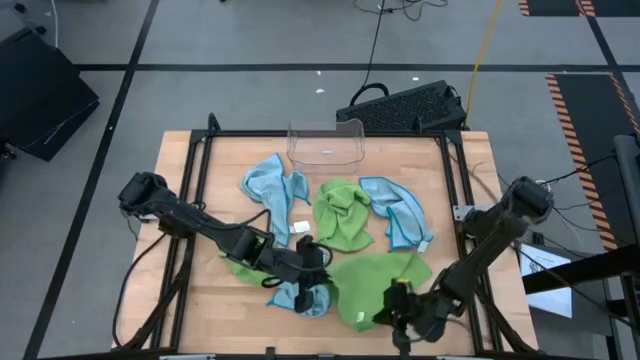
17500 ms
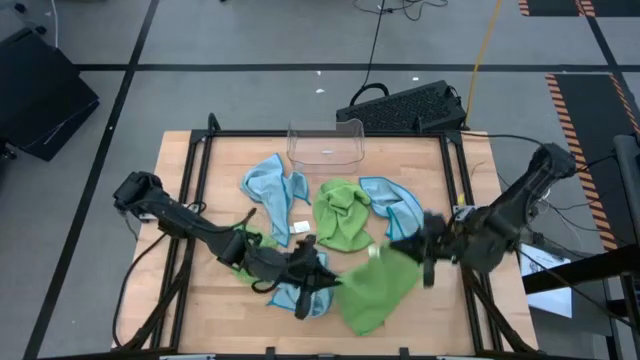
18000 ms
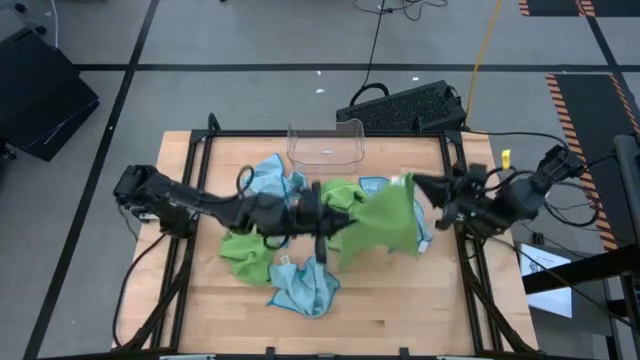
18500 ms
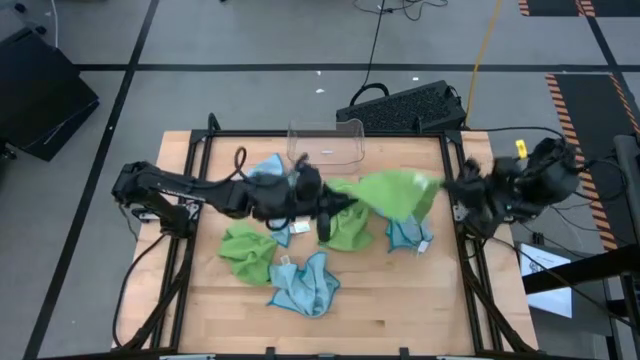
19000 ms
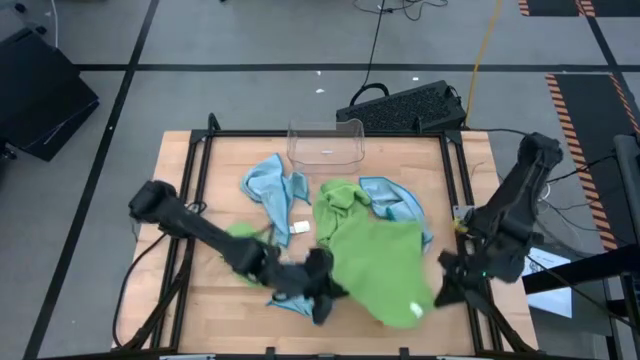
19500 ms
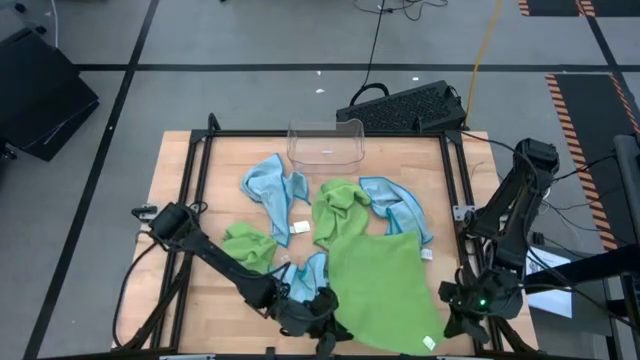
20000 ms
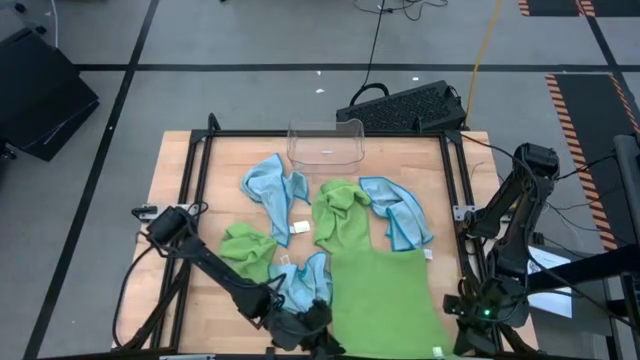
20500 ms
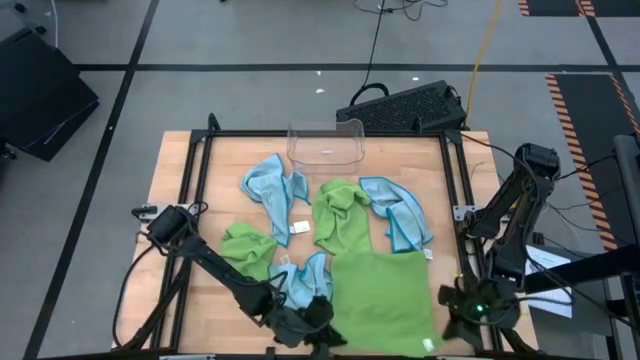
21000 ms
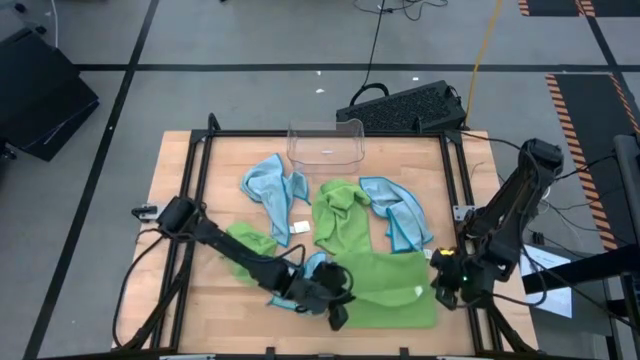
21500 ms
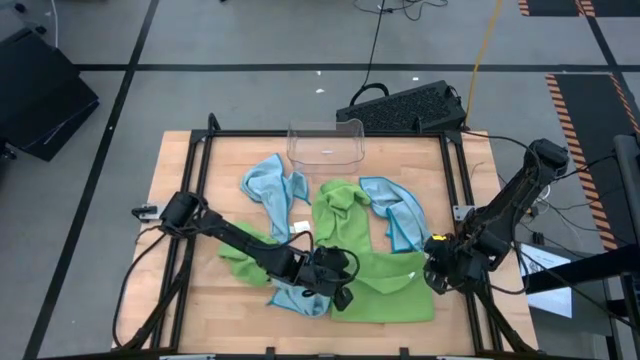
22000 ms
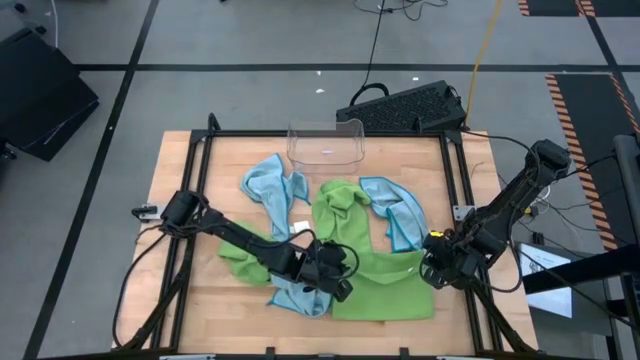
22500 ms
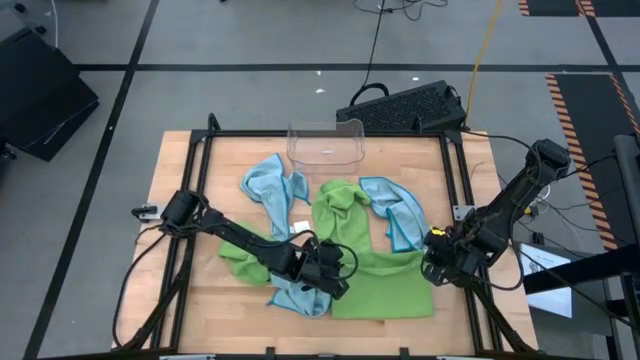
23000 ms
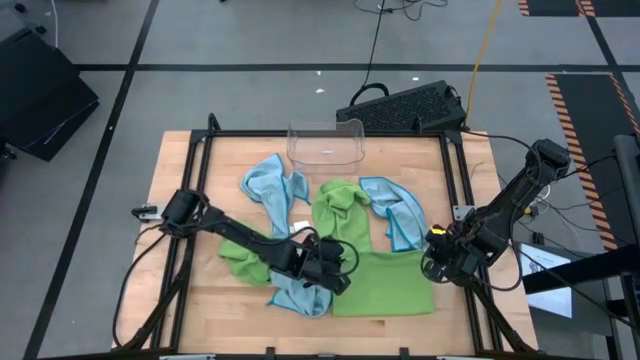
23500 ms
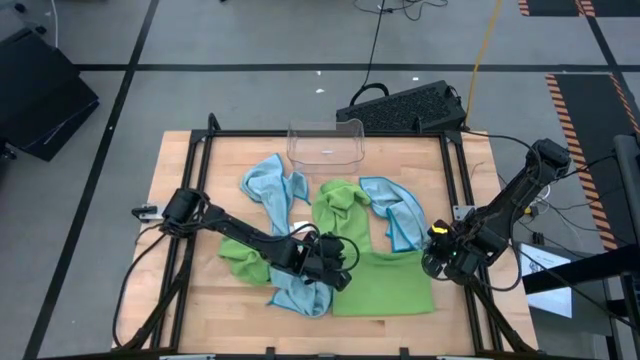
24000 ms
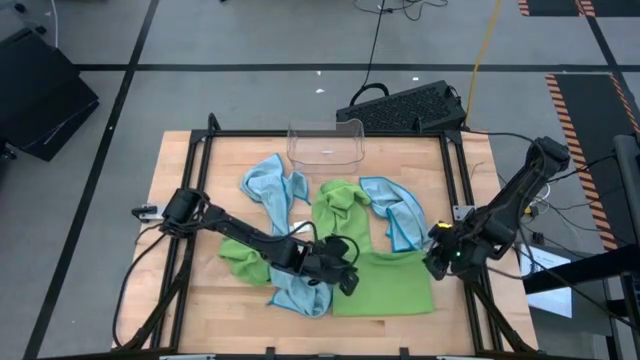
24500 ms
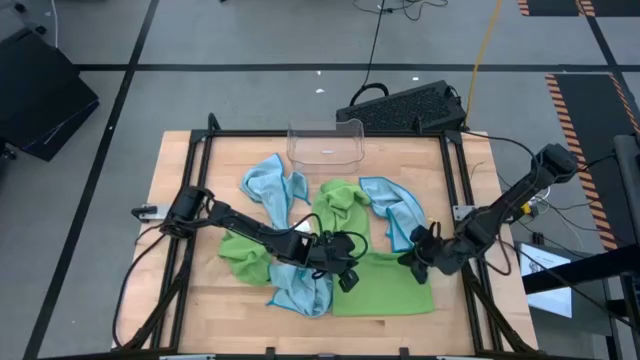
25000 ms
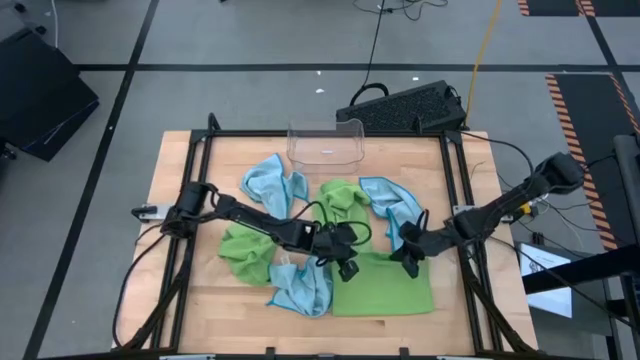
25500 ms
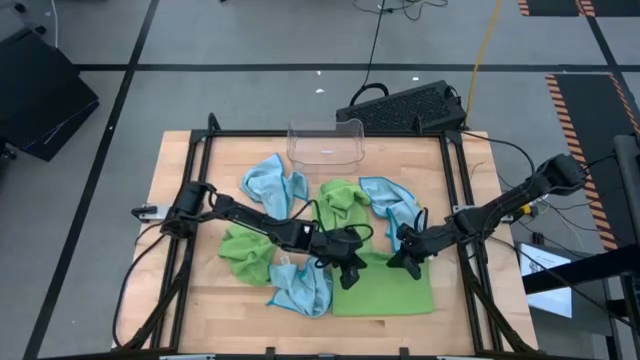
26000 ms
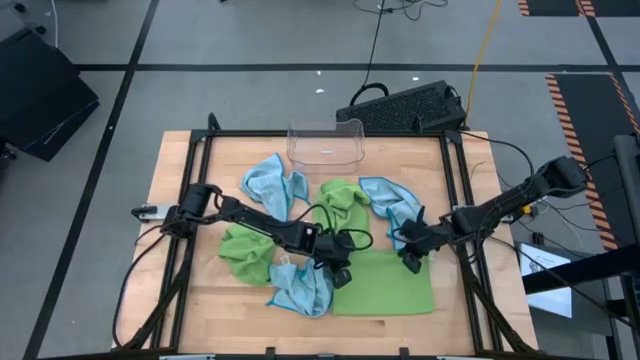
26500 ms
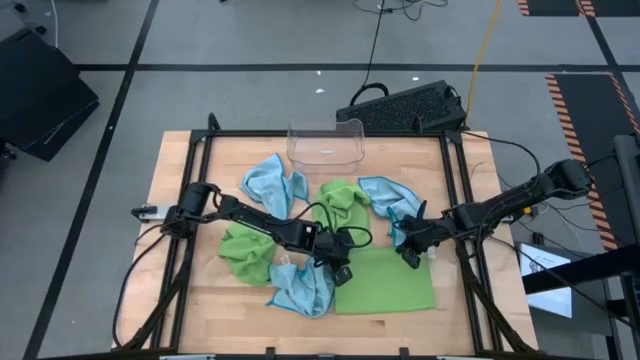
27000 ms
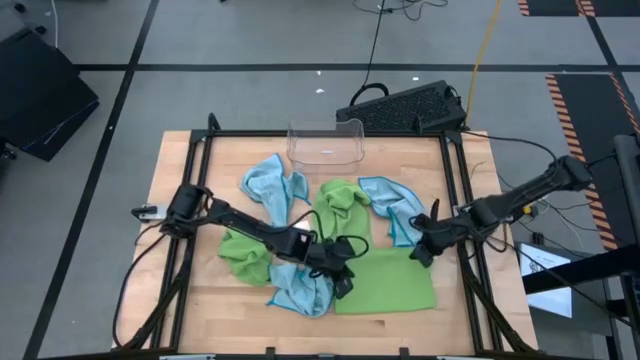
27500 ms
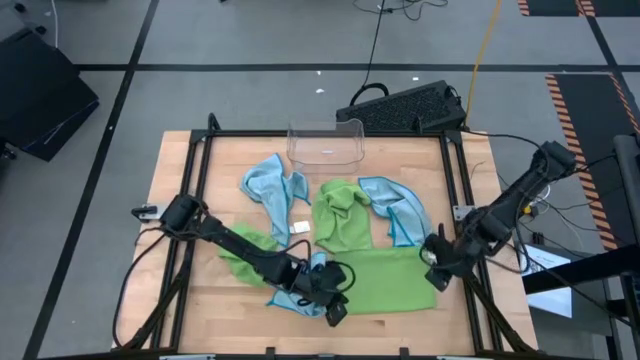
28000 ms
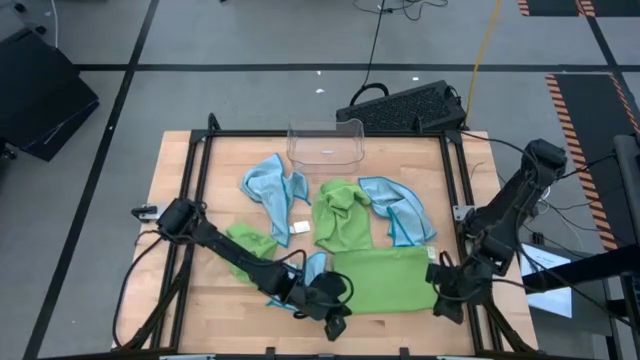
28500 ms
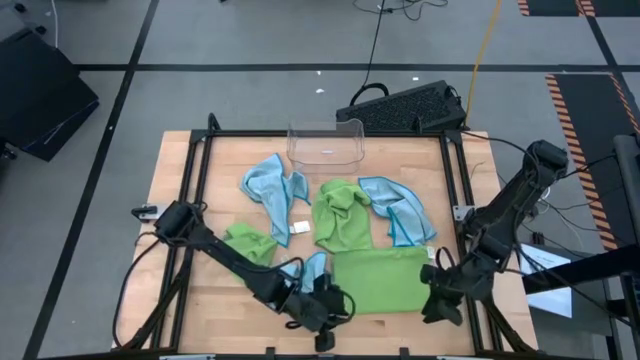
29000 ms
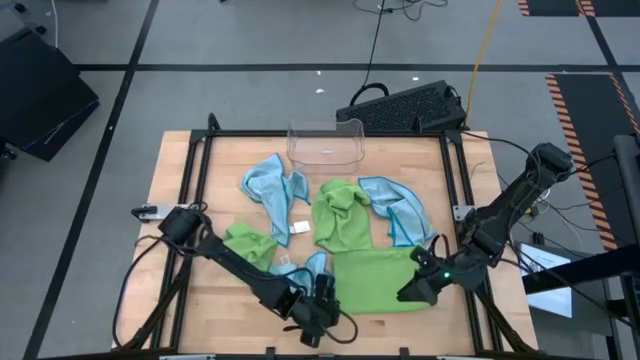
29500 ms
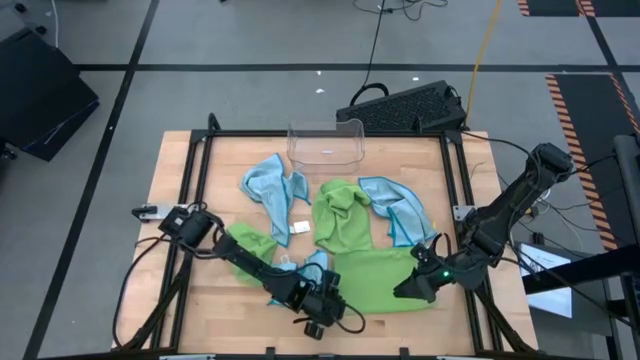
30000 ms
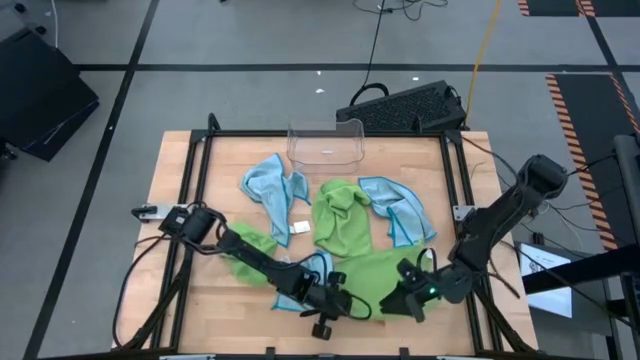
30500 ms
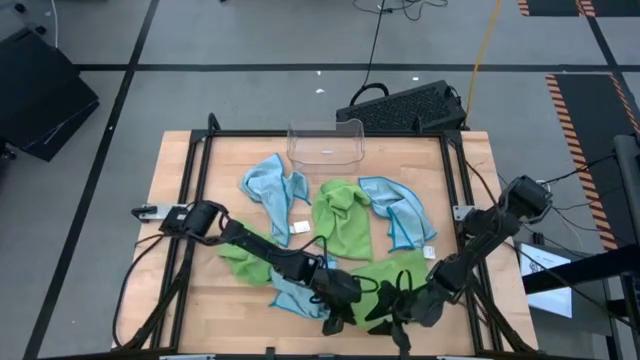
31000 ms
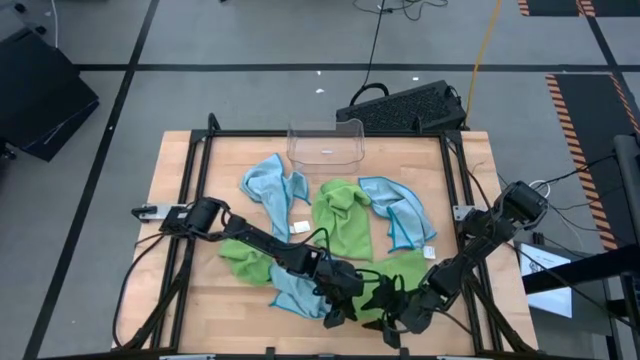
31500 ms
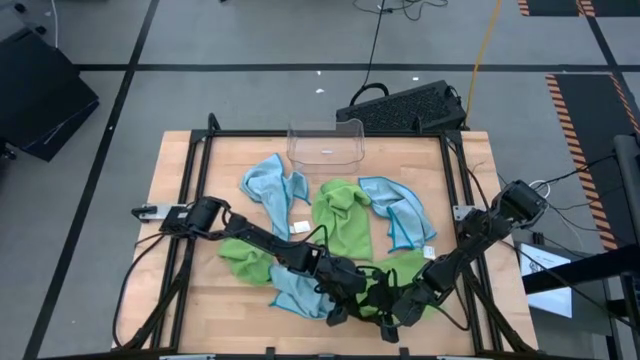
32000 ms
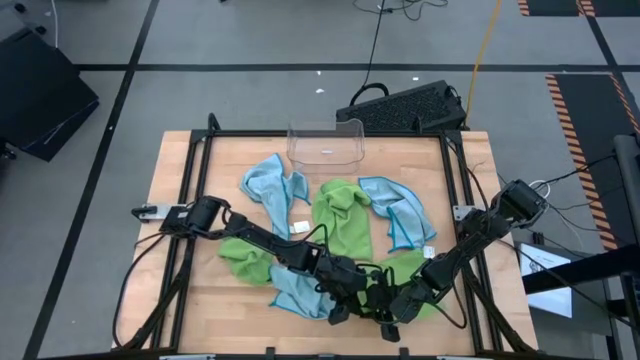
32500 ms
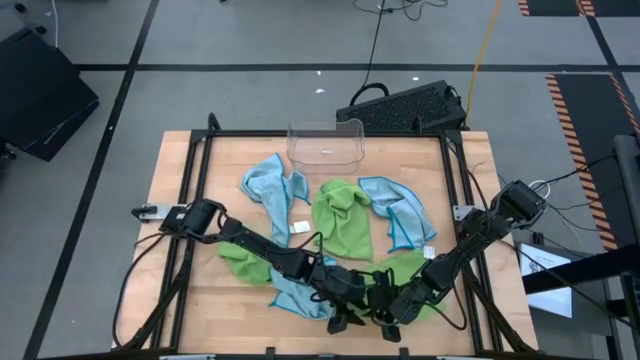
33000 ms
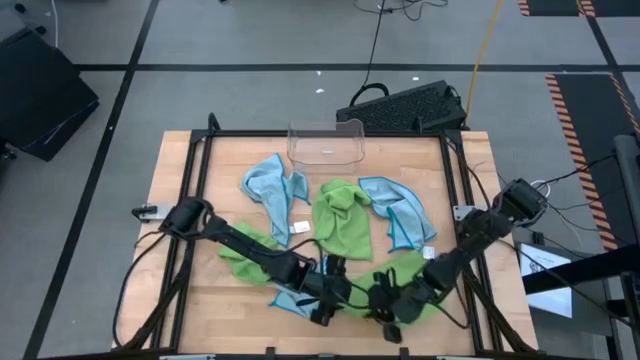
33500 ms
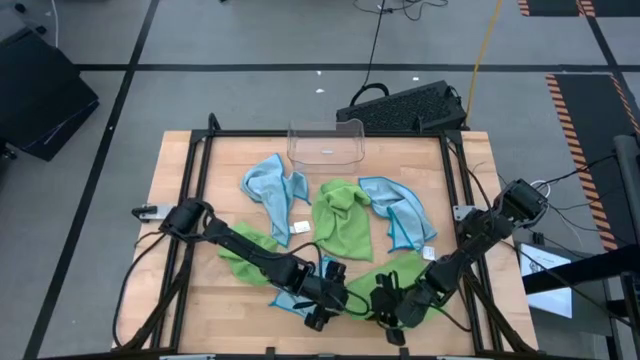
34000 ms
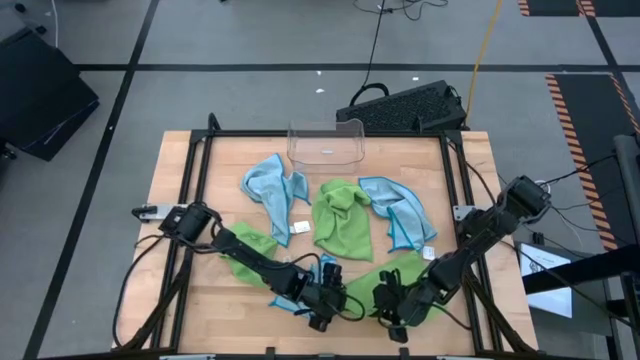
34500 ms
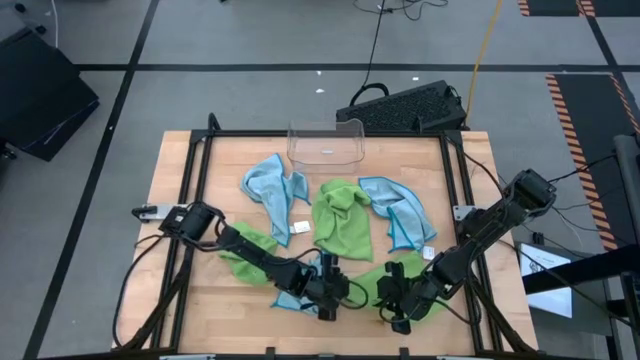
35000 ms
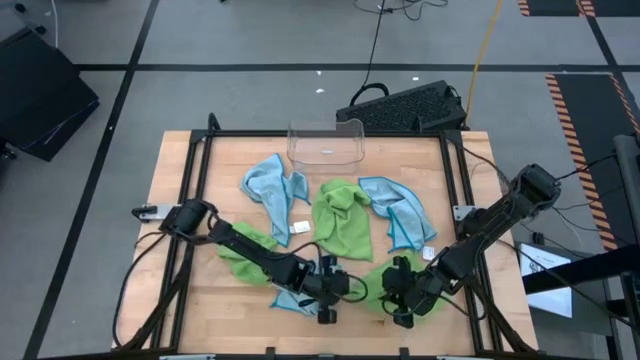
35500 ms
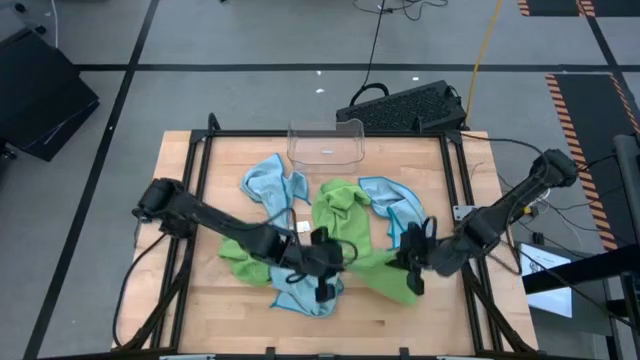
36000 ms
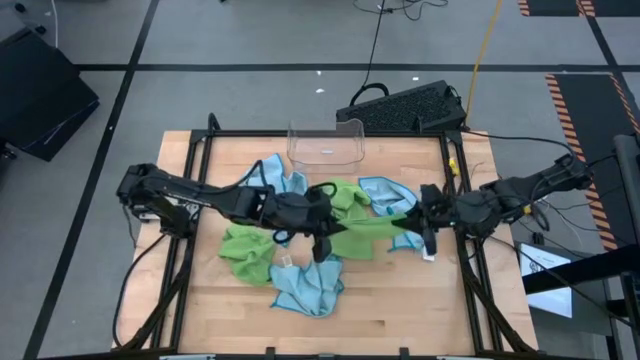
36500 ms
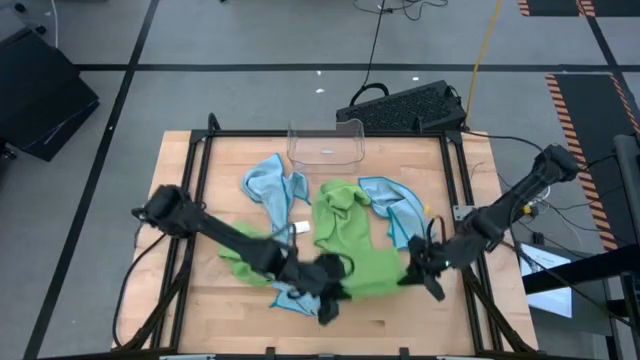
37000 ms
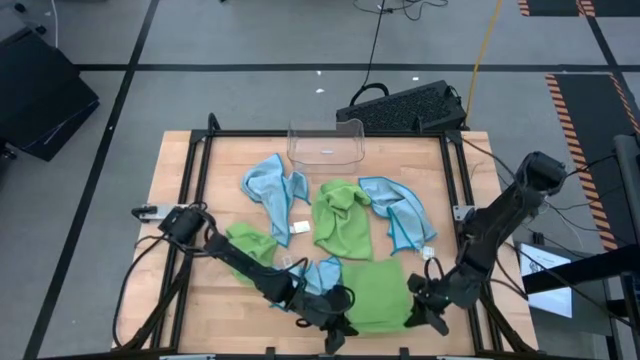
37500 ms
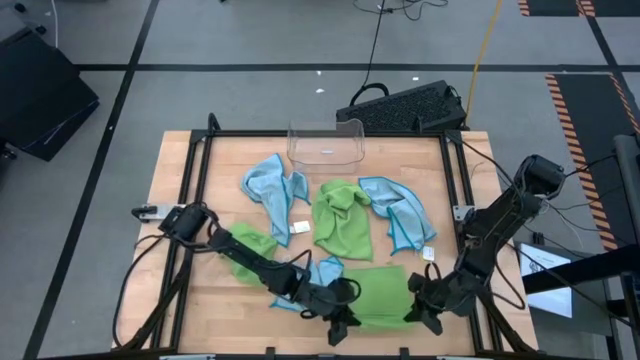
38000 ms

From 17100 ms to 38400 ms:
Task: Fold microfiber towels
Fold the bottom right green microfiber cloth
